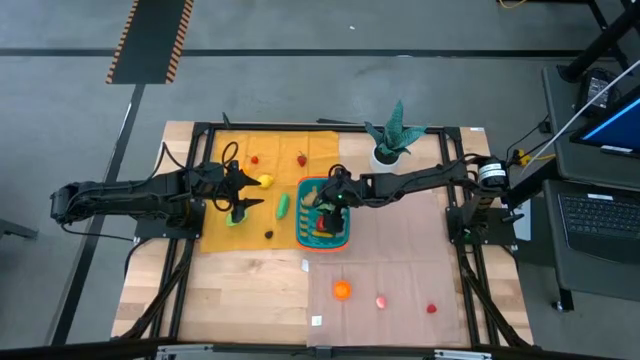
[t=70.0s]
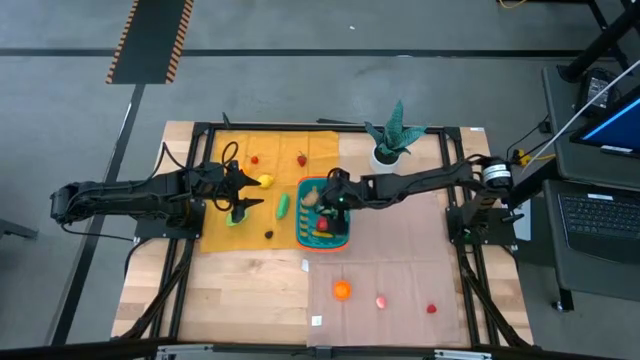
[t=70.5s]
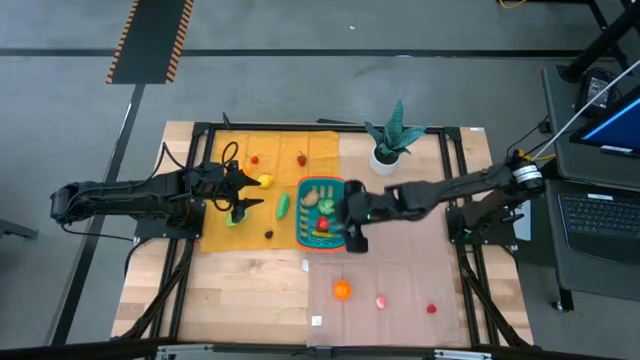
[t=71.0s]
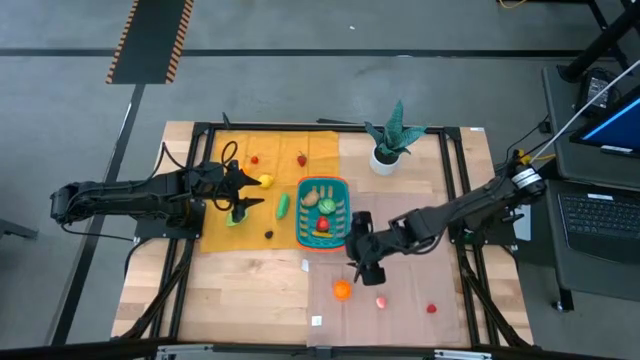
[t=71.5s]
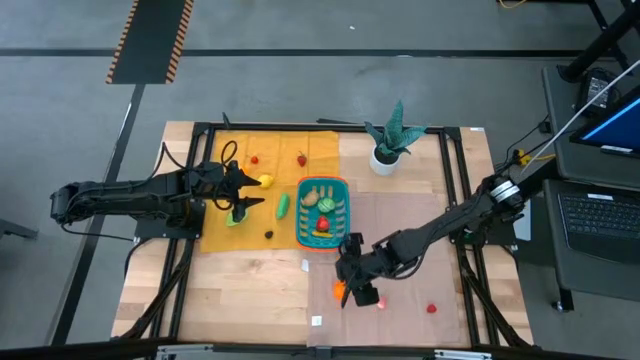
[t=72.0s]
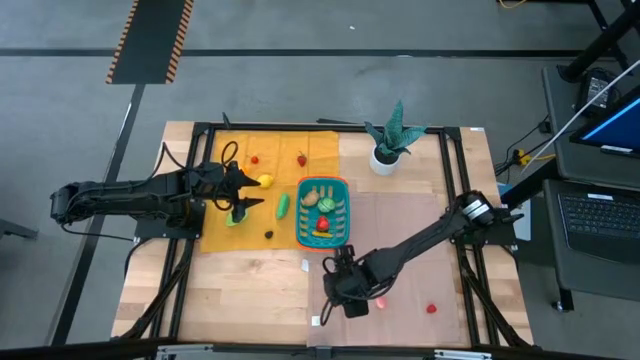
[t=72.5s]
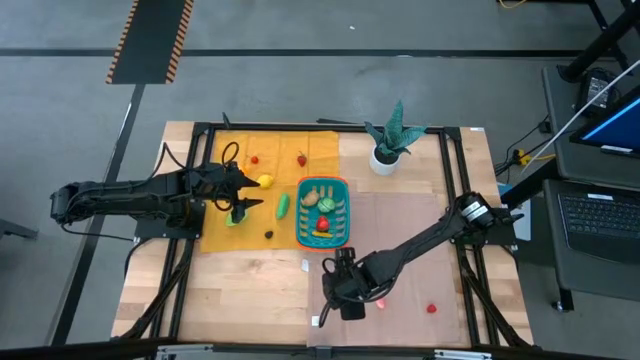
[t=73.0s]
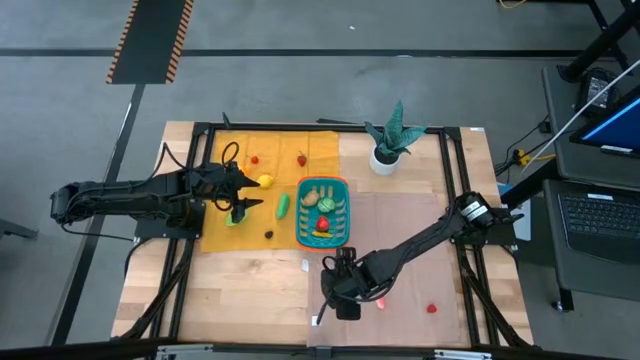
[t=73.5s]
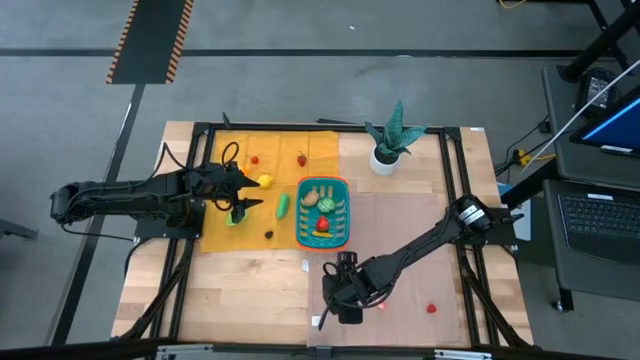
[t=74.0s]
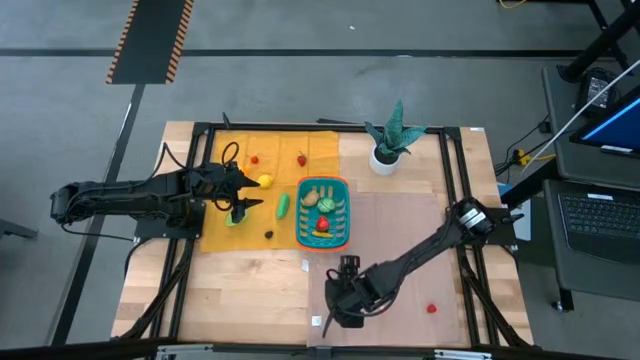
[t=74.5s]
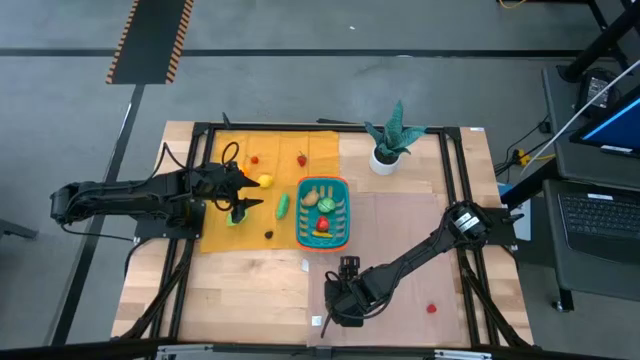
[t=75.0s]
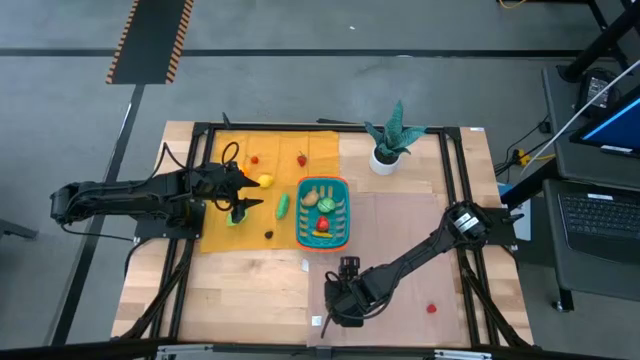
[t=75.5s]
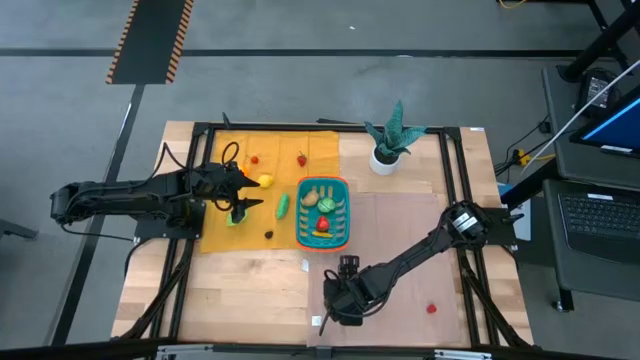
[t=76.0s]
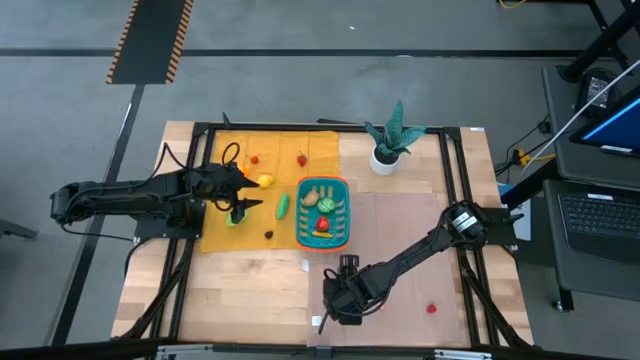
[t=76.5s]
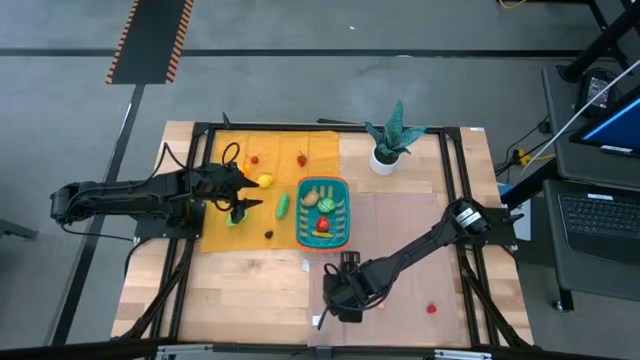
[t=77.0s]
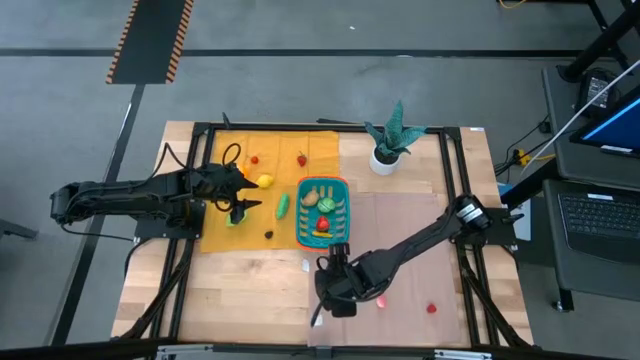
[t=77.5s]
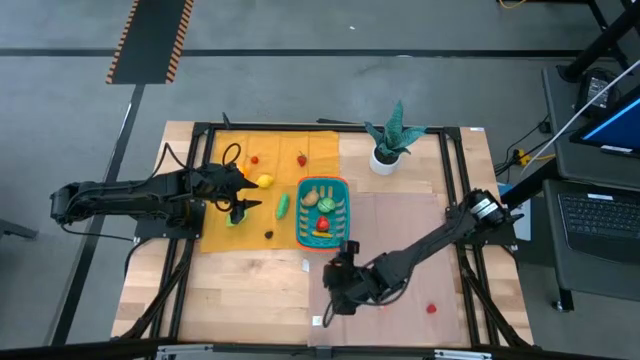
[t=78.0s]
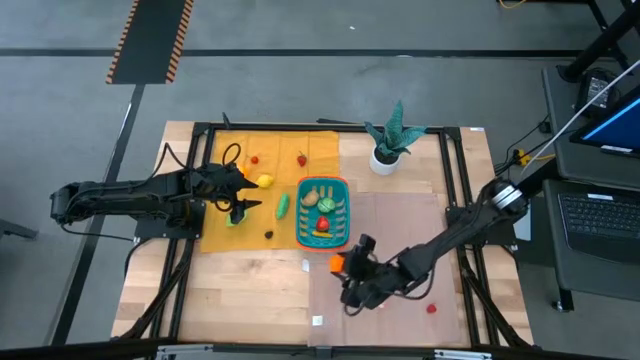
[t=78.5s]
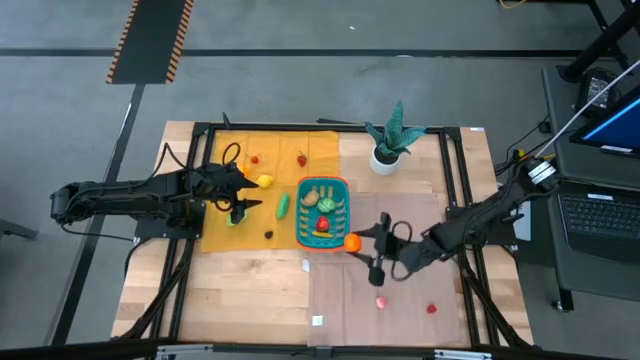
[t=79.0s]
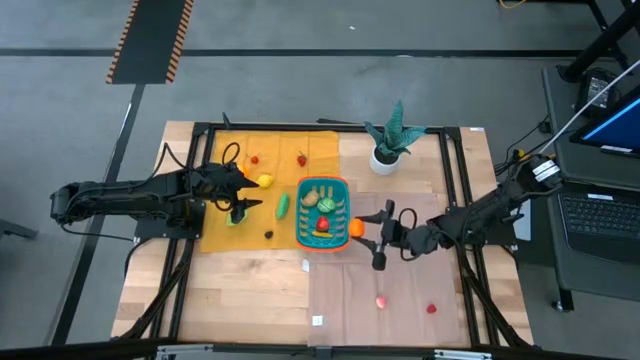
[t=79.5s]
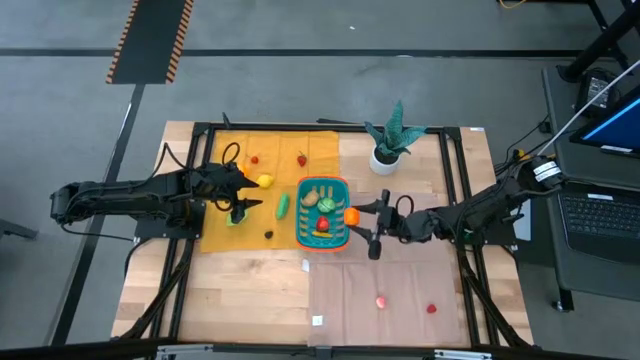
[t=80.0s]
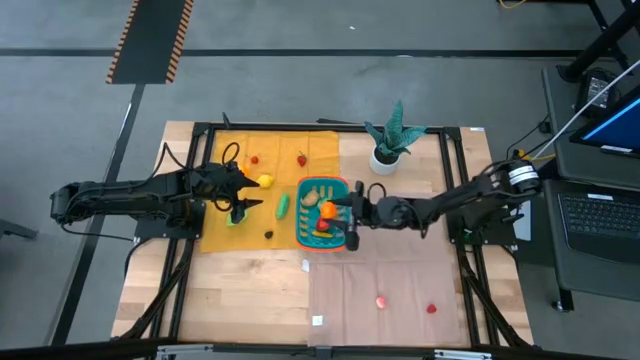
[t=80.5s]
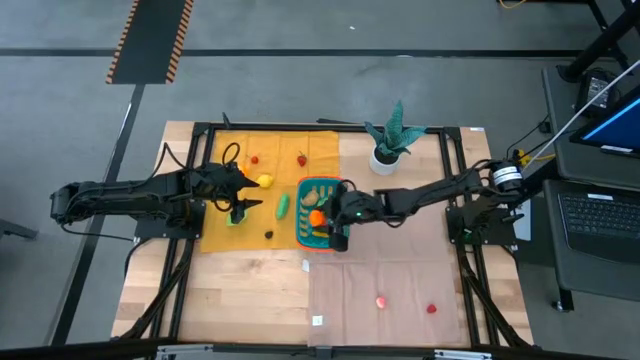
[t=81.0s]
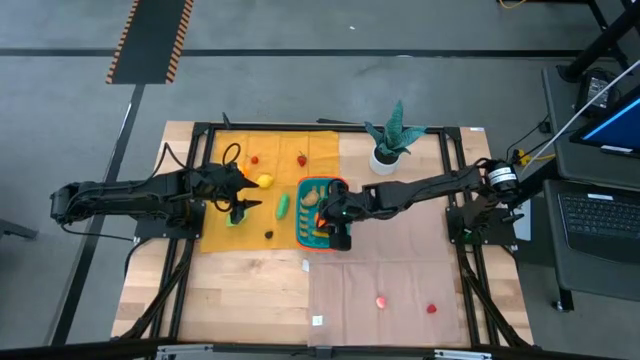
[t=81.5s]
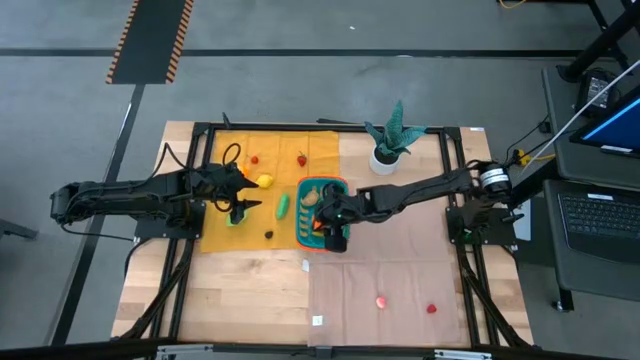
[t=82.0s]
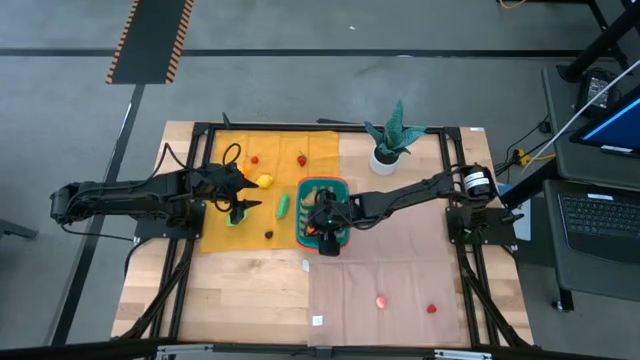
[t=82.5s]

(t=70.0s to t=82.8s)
Task: Pick and placing Produce into tupperware
Put the tangerine into the basket

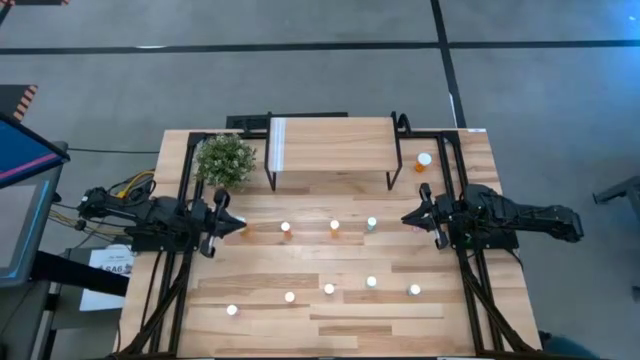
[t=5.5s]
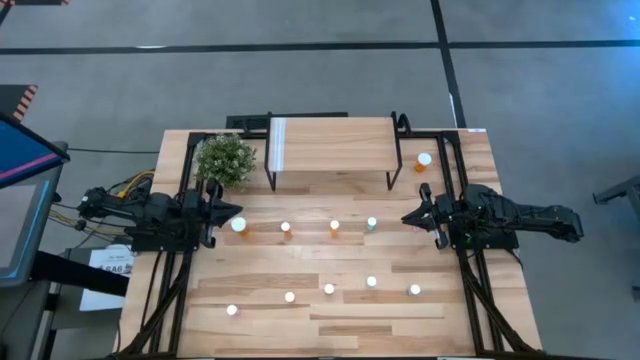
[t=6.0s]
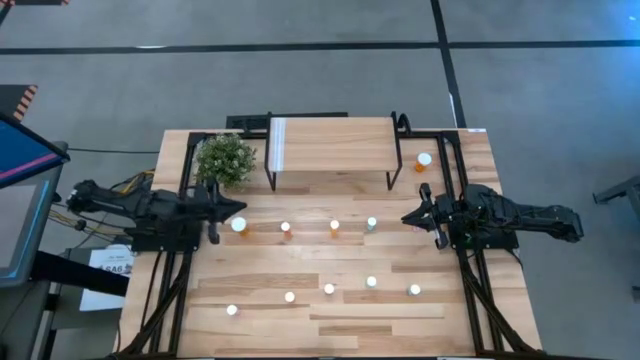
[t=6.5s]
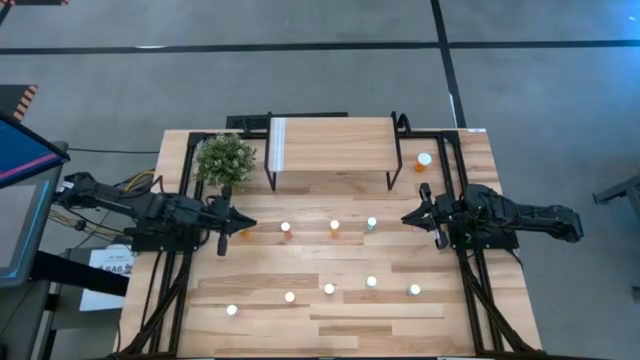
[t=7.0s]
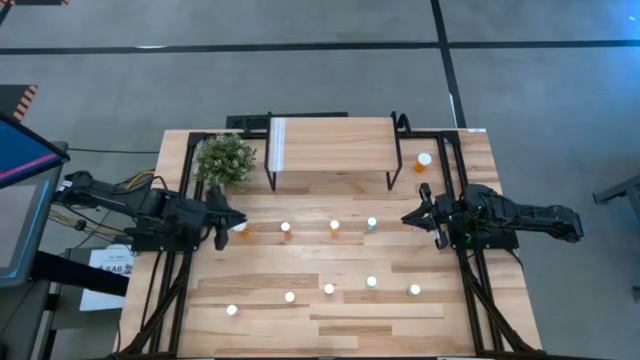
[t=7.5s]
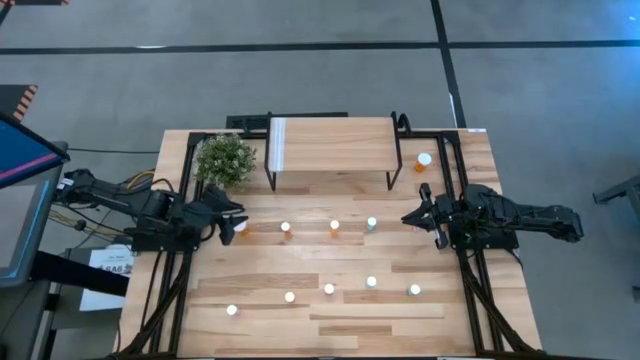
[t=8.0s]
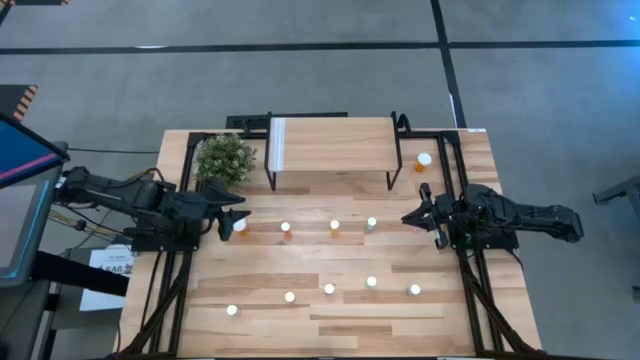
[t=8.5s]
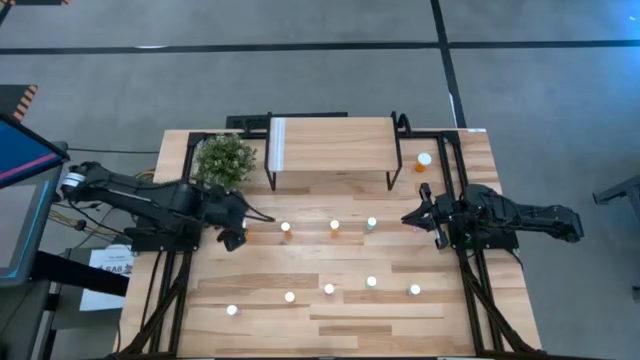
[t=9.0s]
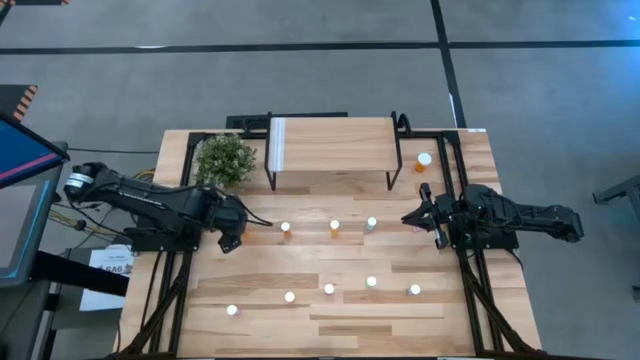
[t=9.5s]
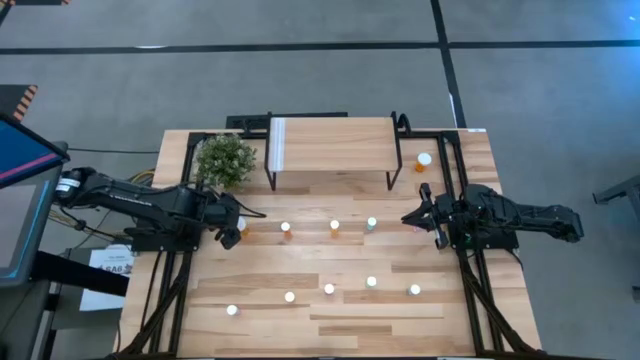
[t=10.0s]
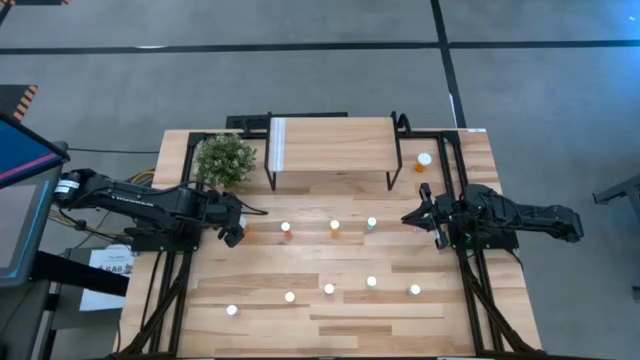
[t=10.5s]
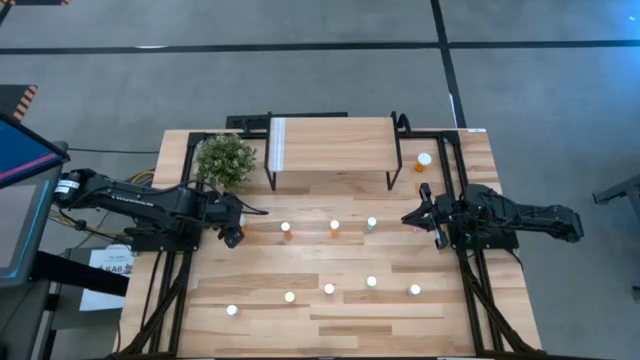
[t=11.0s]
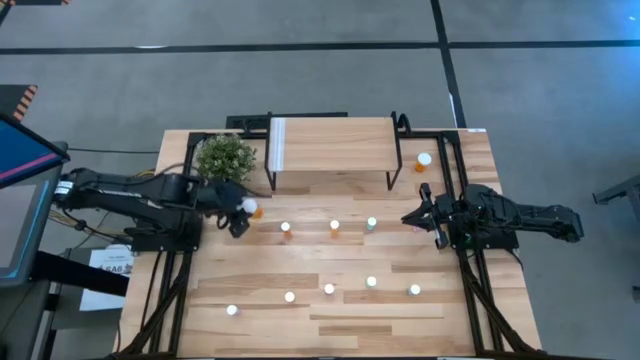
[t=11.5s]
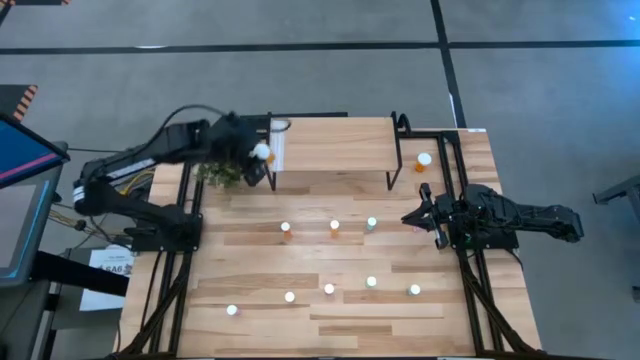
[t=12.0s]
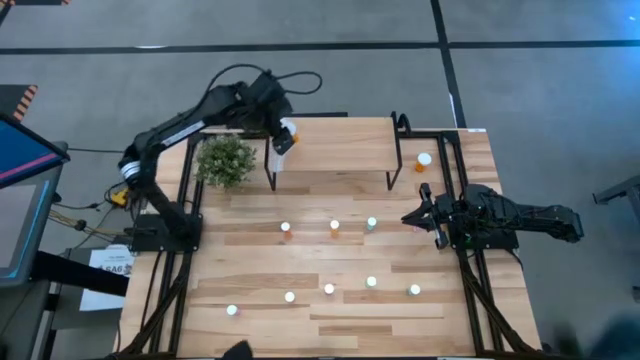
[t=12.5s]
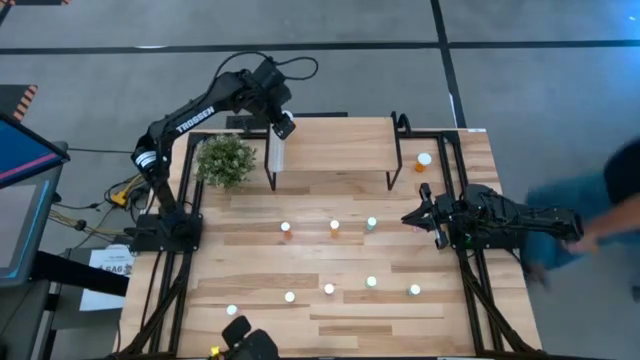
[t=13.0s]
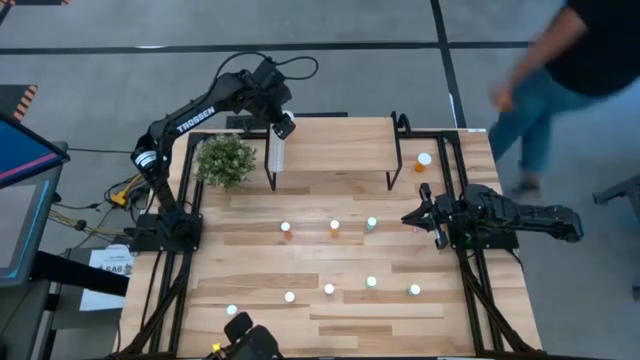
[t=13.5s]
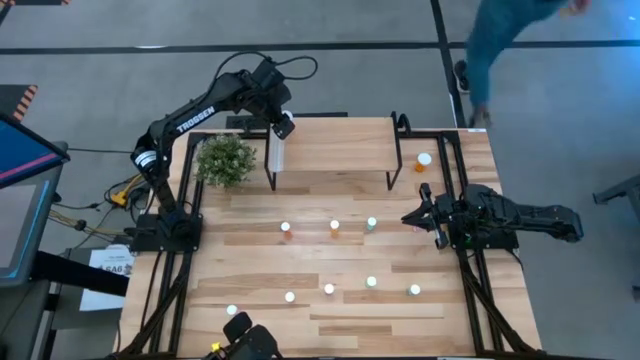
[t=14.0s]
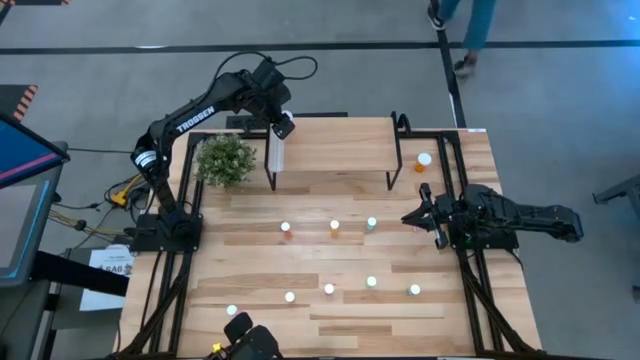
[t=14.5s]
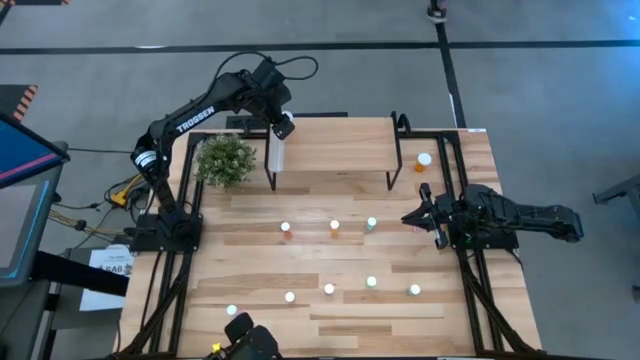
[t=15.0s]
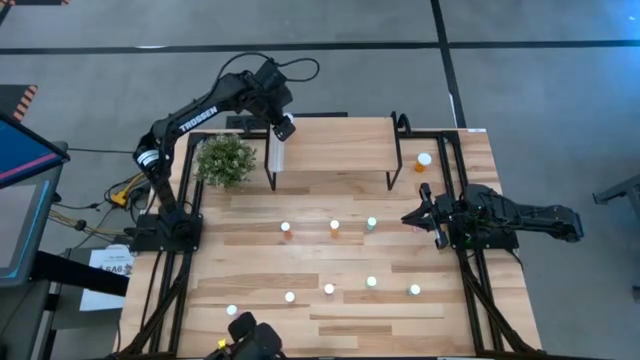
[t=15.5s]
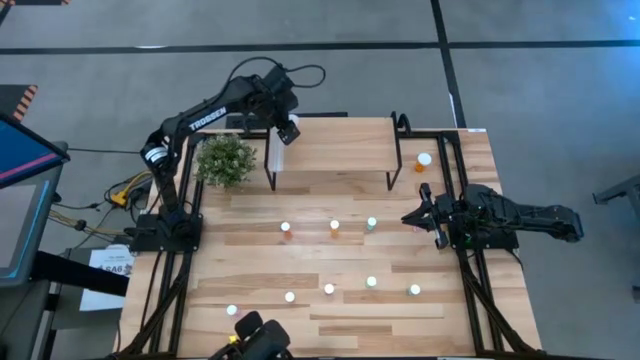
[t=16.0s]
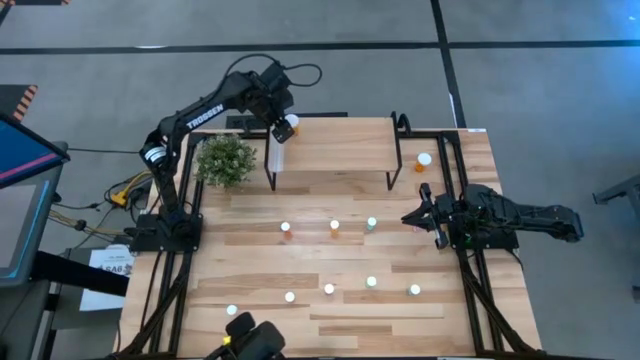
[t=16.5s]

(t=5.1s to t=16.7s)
Task: Pick and place medicine bottles onto shelf by color
Put the big bottom orange pill bottle on the shelf
